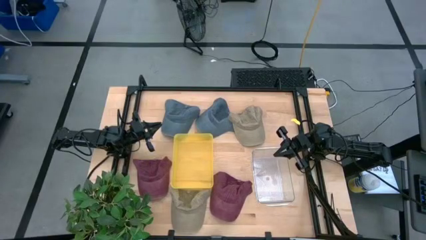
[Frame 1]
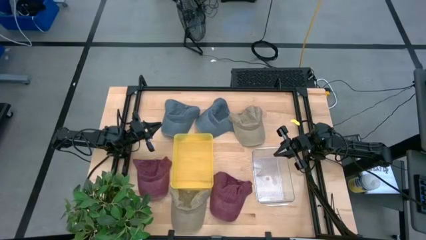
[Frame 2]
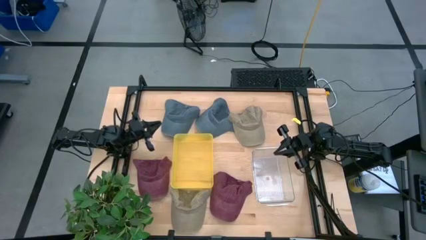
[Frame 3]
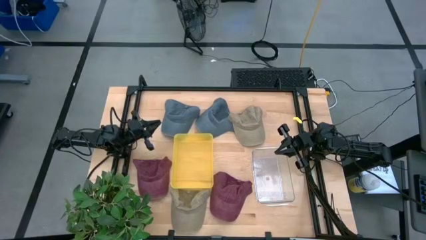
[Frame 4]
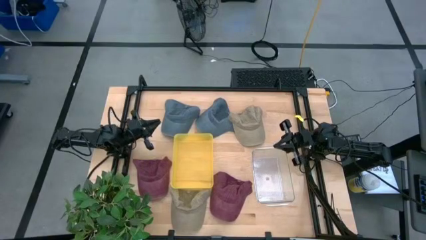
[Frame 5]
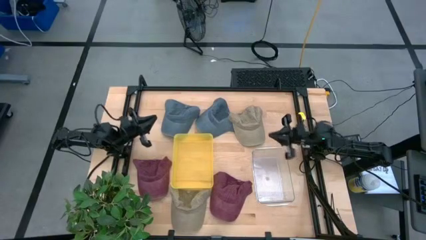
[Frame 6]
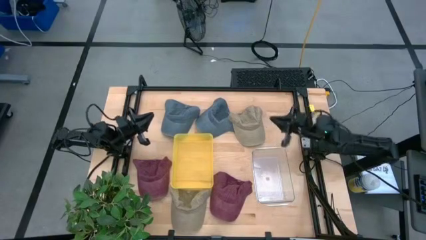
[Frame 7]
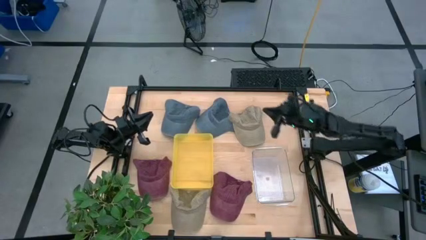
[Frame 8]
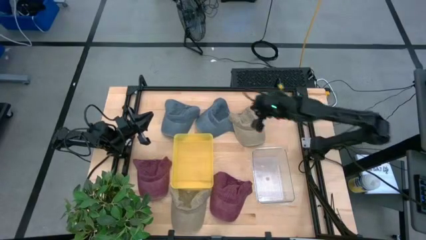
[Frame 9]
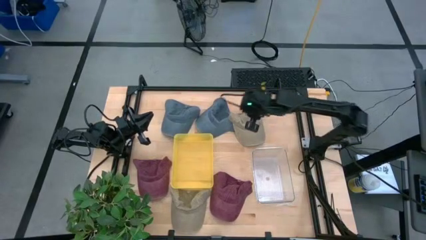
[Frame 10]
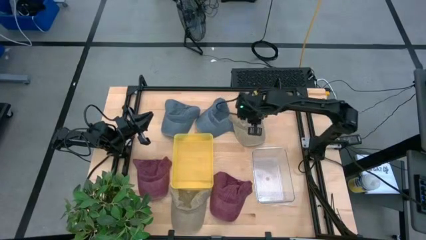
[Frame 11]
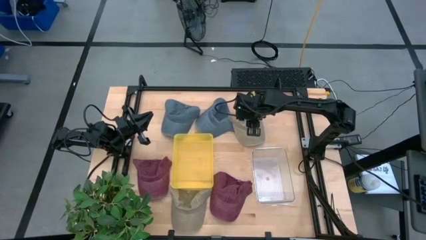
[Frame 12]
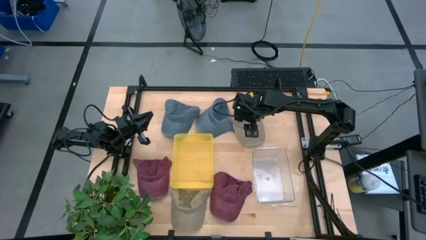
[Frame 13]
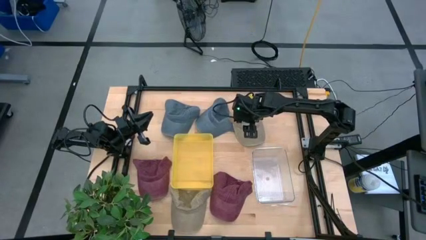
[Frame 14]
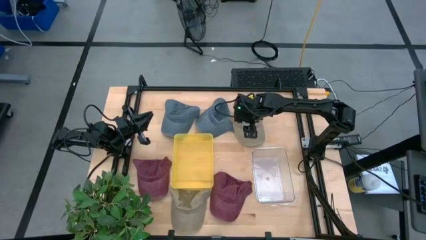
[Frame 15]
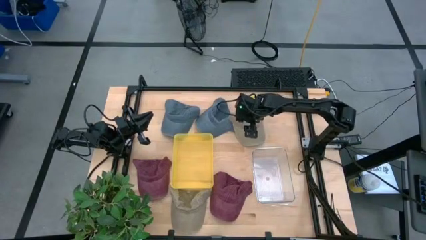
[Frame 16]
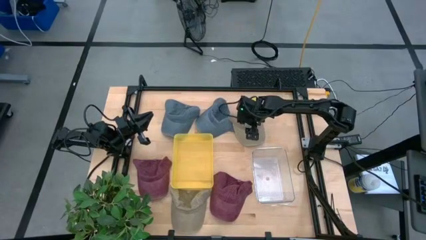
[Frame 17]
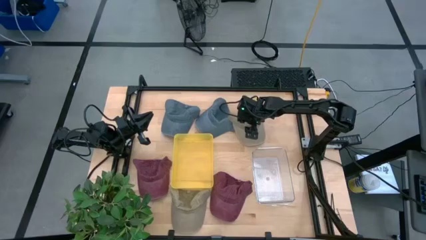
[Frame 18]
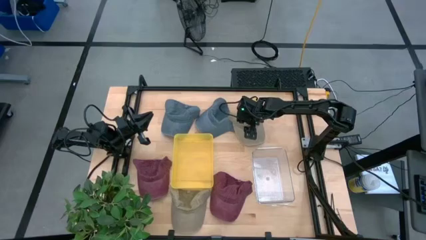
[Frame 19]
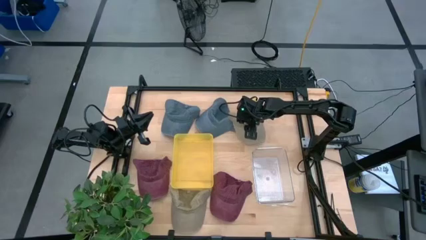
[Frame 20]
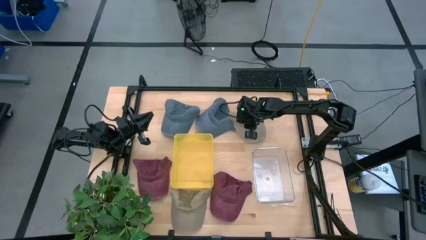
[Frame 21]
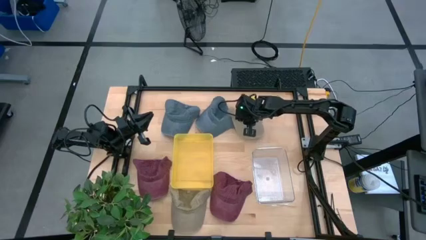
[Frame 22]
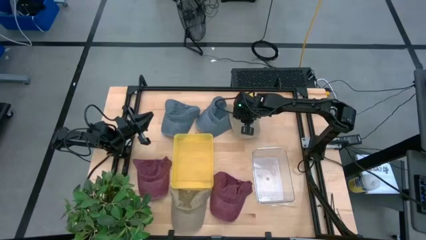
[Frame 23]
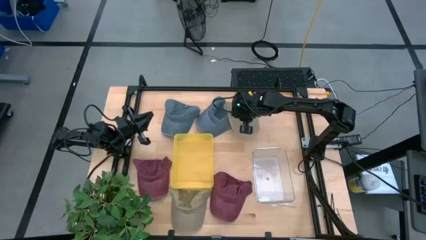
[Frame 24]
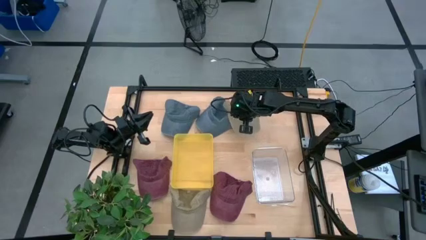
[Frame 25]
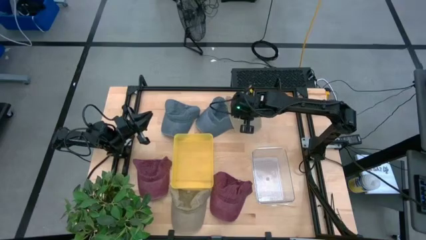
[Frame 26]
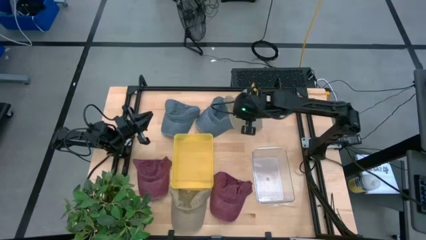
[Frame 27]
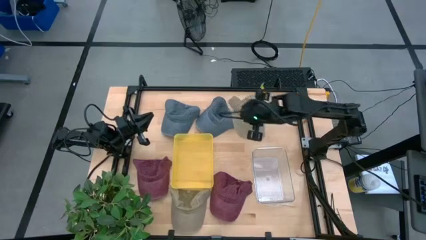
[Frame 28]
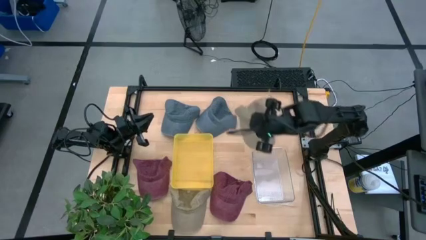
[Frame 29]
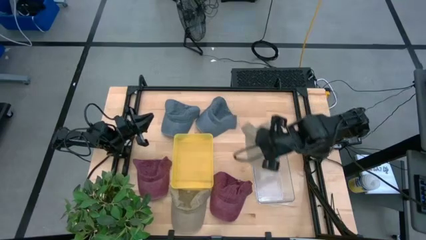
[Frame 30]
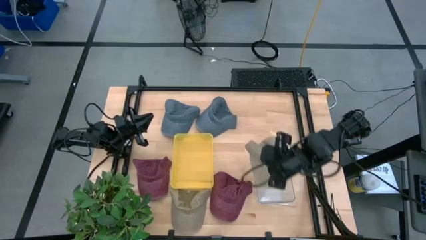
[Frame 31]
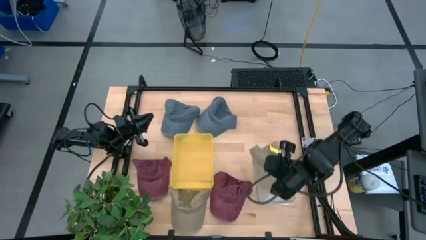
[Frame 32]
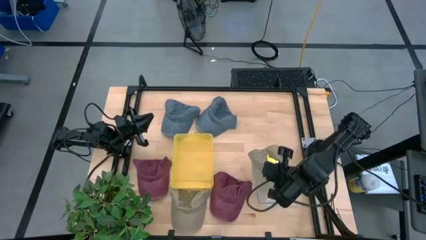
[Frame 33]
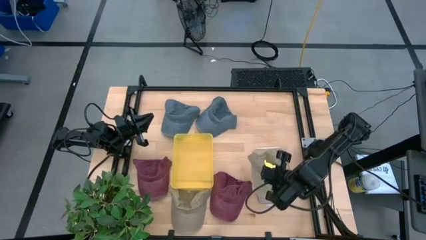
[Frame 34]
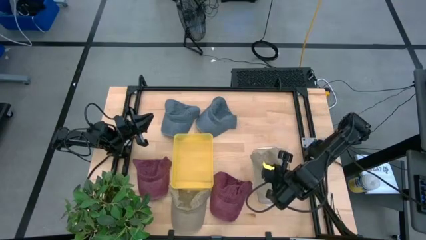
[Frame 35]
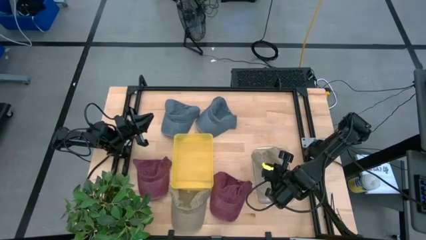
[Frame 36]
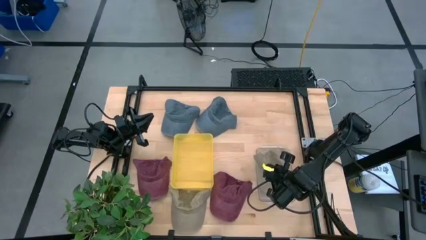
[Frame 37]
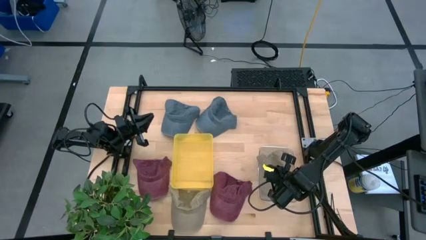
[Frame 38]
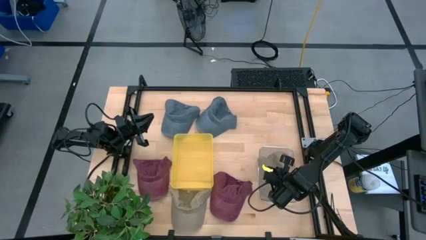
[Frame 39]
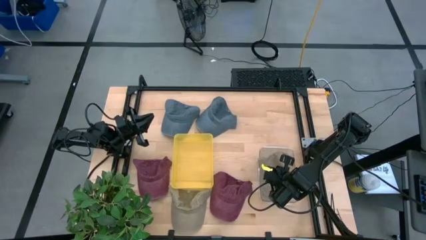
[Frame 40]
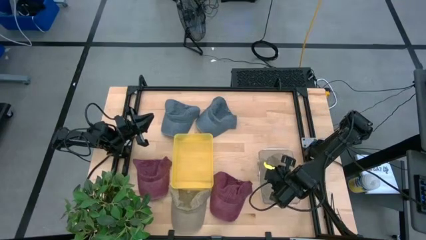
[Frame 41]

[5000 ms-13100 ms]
Task: Pick & Place hat
Put the top brown cap into the transparent bin

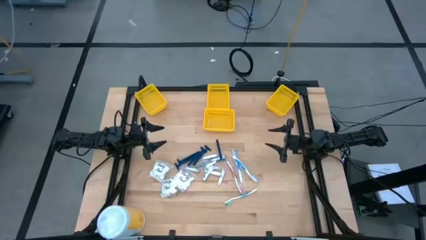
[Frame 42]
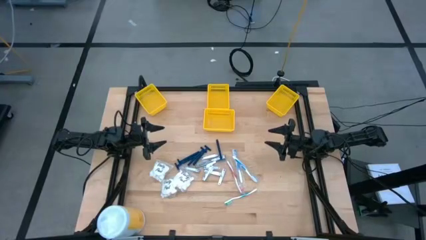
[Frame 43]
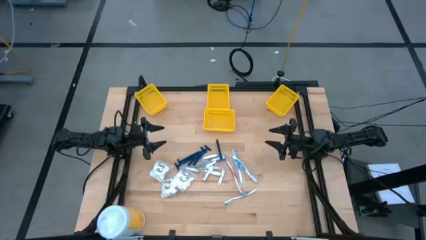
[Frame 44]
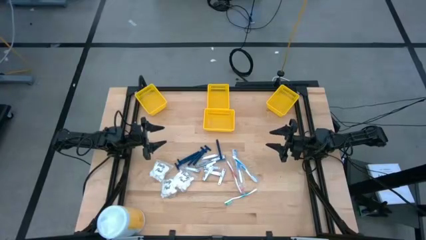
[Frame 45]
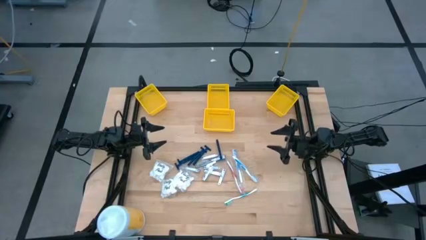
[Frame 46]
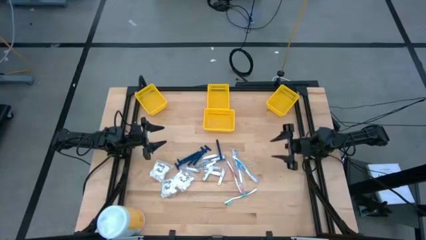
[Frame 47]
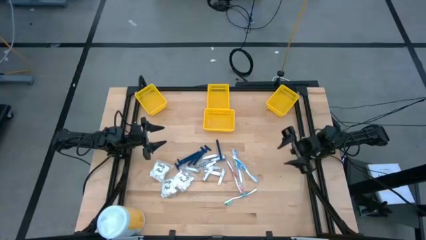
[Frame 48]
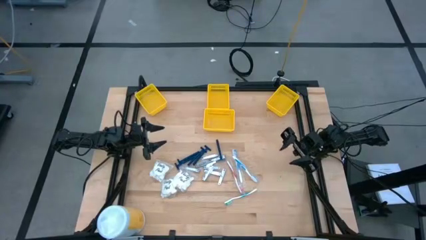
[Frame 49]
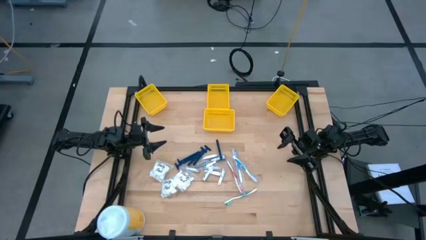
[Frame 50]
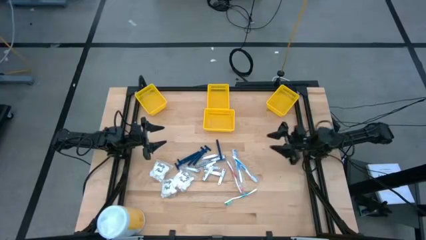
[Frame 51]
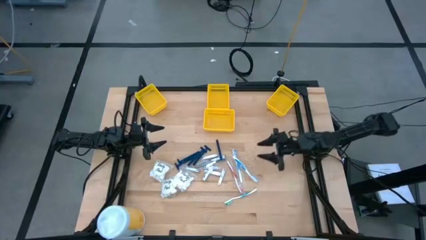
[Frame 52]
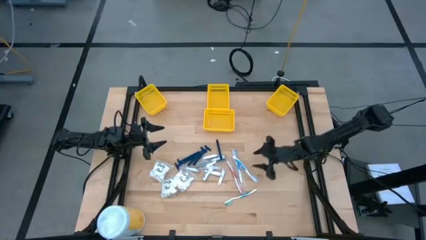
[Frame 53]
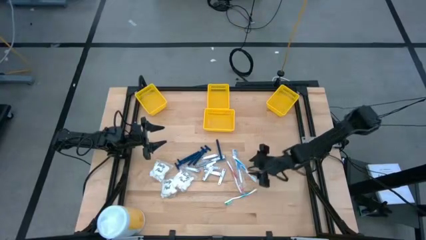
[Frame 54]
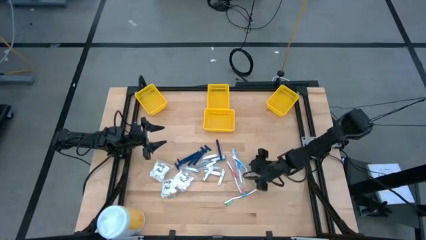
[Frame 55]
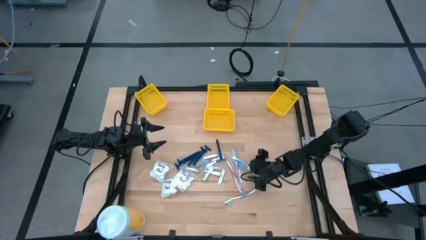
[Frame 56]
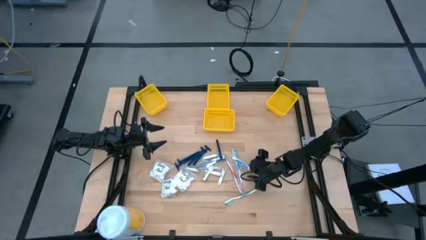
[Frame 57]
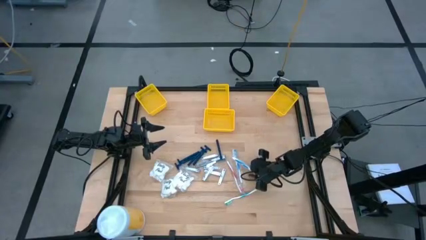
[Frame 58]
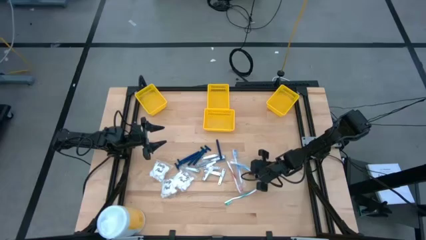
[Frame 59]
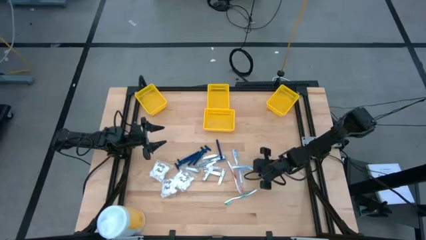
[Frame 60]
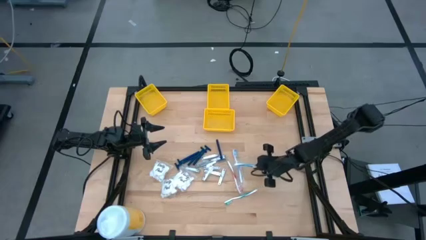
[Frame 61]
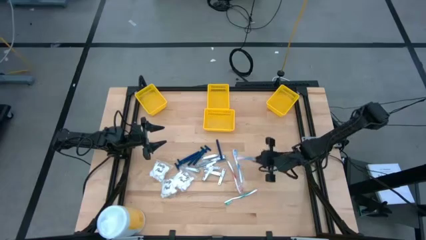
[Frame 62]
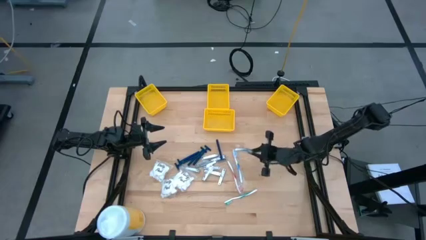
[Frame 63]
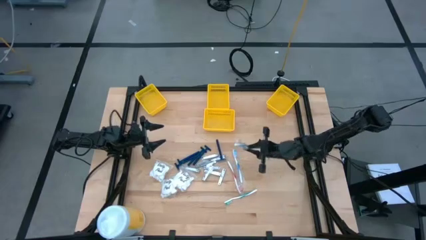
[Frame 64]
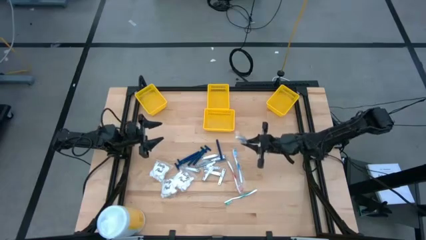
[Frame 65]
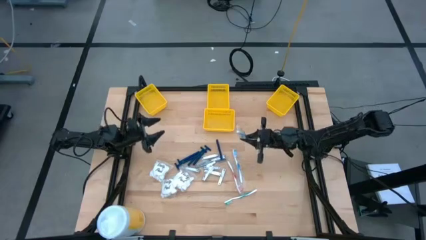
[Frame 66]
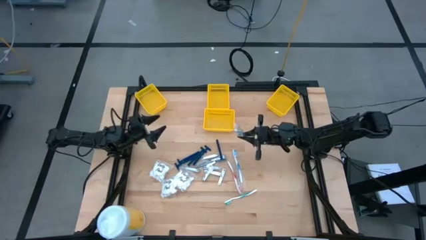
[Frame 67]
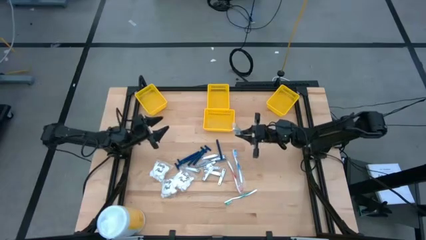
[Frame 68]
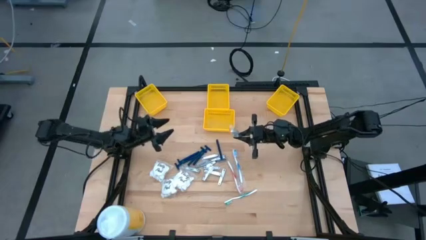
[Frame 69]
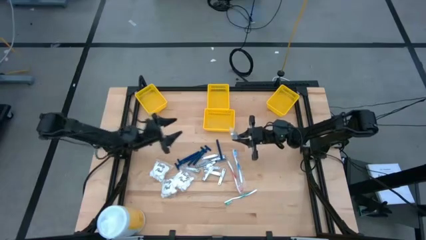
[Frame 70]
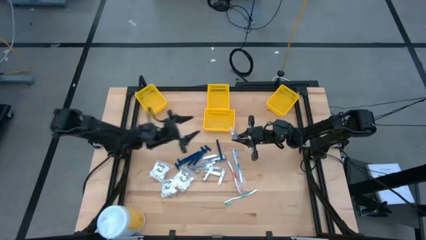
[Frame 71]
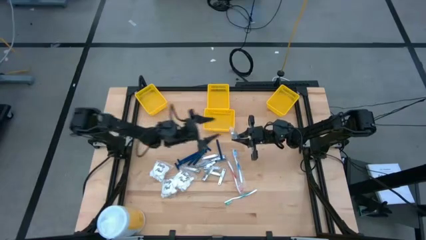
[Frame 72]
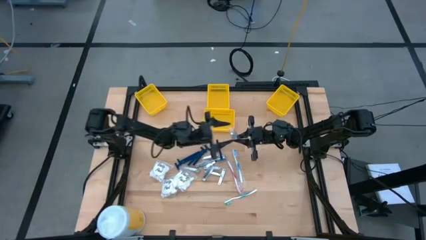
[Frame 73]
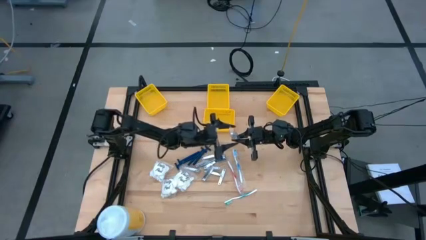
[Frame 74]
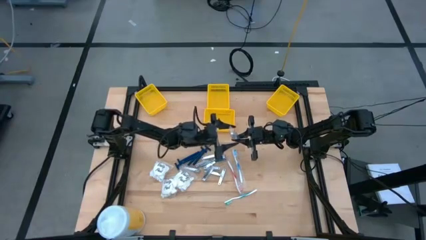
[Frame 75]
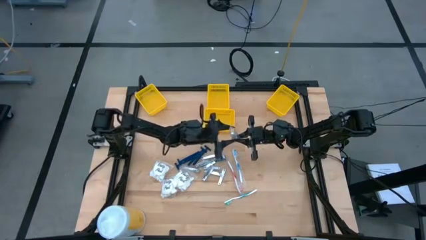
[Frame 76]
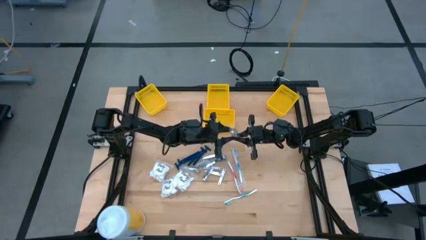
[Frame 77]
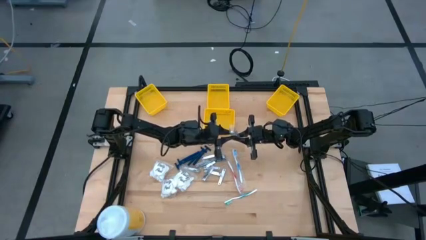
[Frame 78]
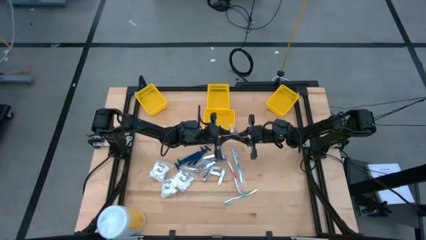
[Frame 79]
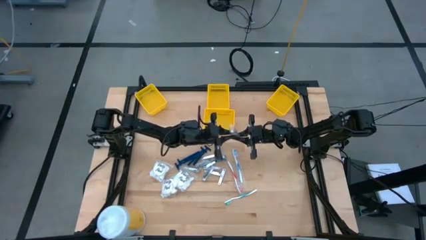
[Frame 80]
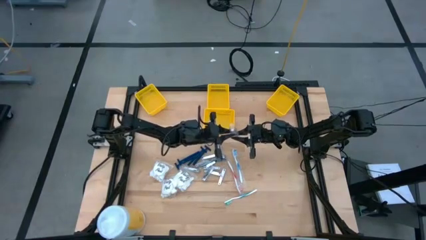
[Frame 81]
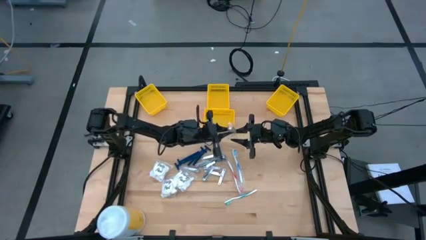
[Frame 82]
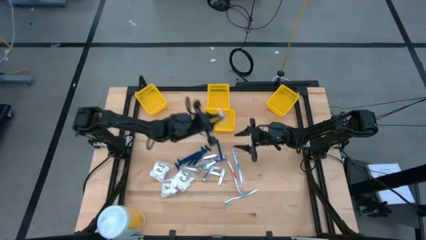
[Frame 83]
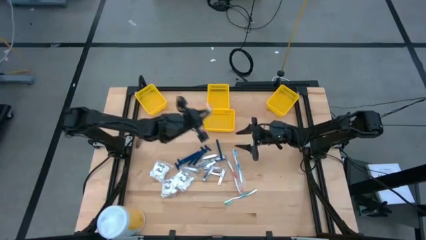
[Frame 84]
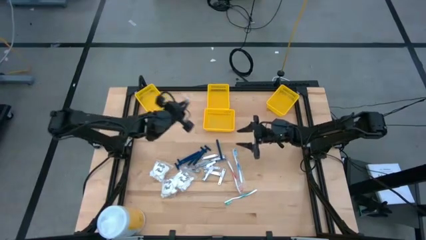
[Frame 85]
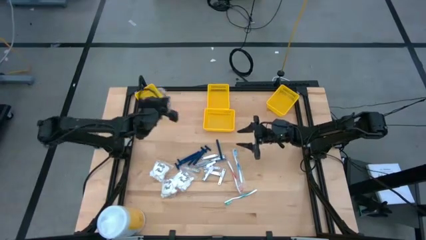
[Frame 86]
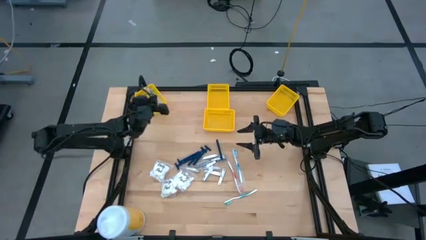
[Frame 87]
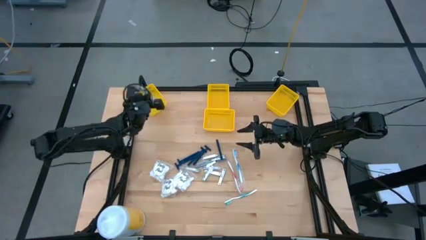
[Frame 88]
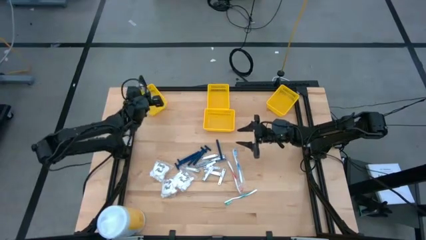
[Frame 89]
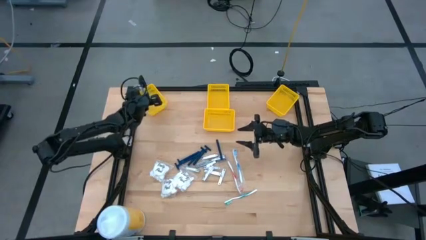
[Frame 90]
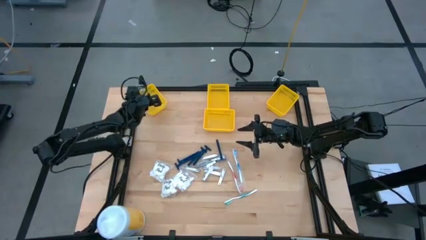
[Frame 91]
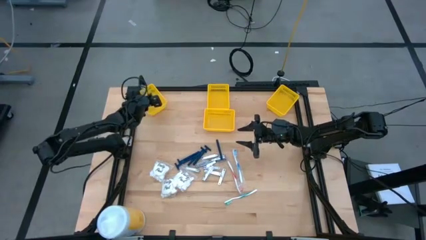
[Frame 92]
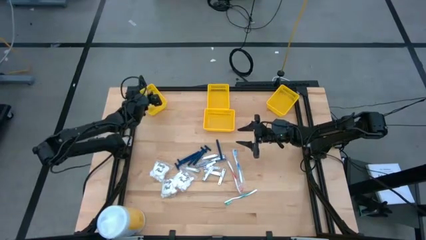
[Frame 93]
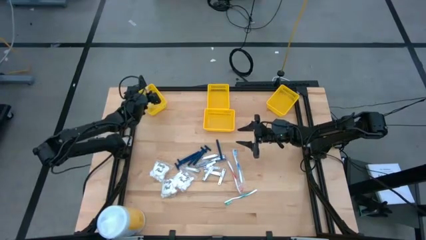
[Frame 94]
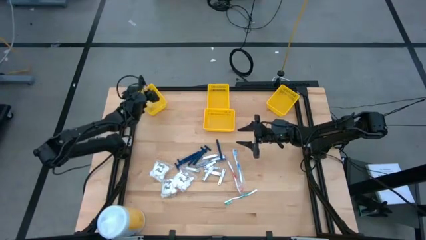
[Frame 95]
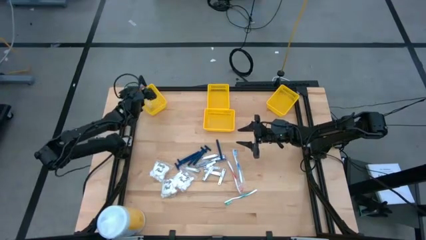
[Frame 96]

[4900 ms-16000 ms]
Task: Pick & Place Travel size toiletries
Put the blue toothbrush into the left yellow bin
